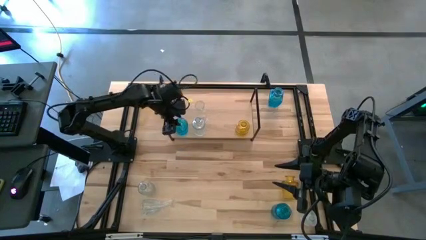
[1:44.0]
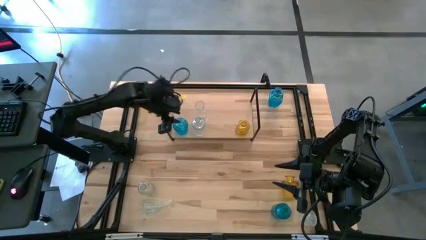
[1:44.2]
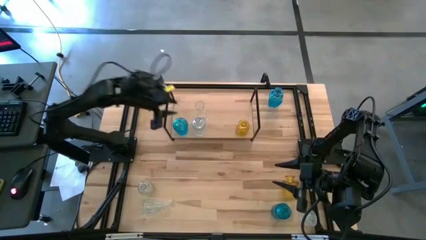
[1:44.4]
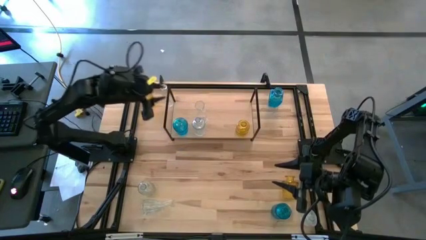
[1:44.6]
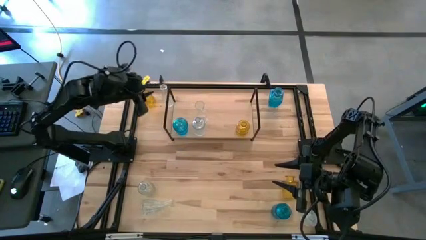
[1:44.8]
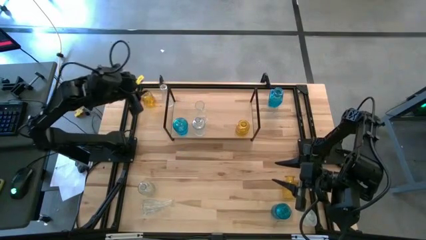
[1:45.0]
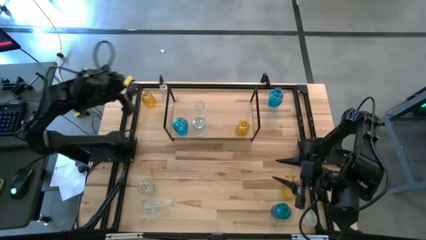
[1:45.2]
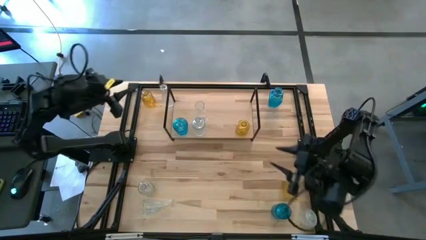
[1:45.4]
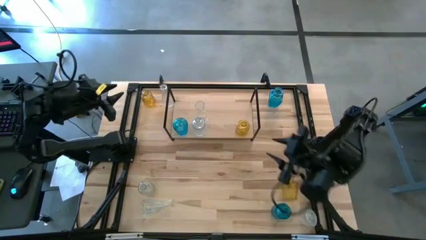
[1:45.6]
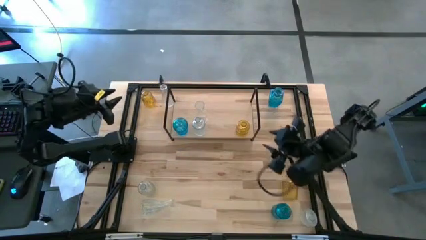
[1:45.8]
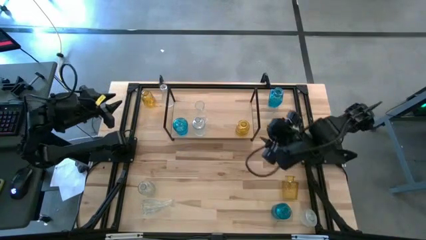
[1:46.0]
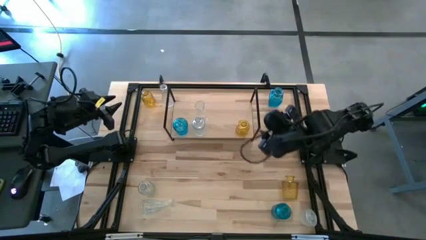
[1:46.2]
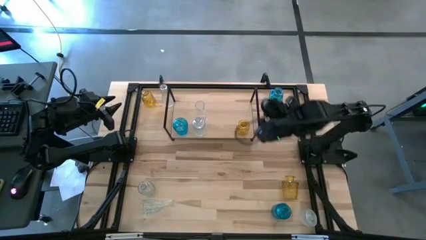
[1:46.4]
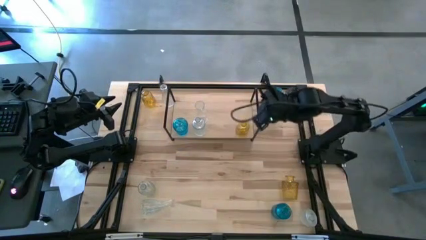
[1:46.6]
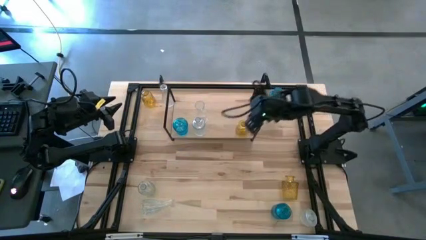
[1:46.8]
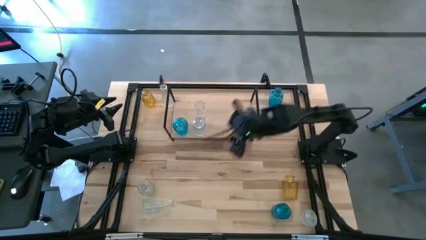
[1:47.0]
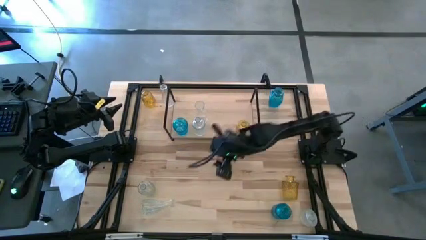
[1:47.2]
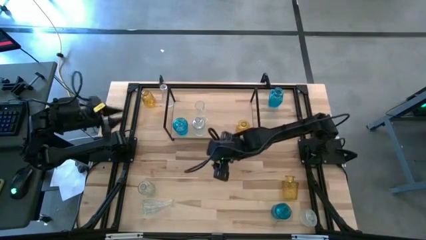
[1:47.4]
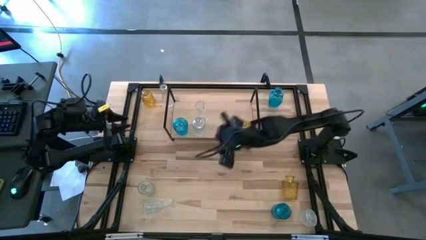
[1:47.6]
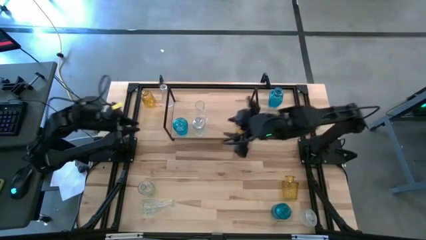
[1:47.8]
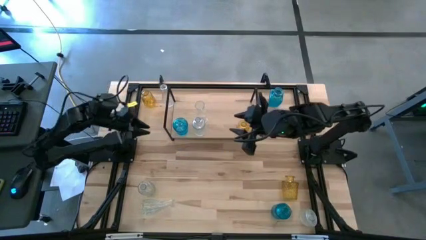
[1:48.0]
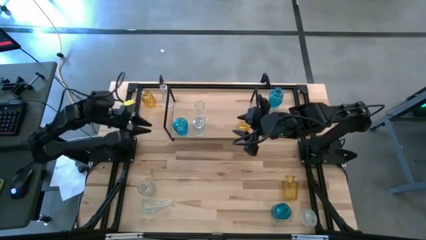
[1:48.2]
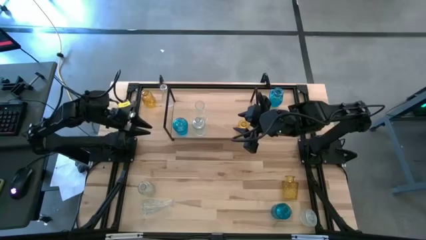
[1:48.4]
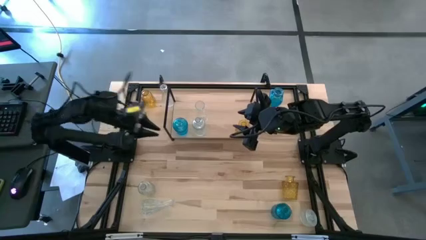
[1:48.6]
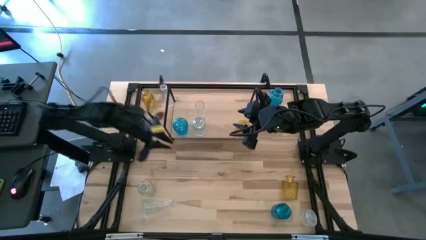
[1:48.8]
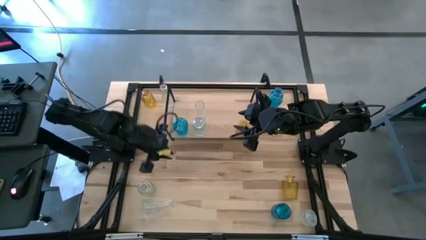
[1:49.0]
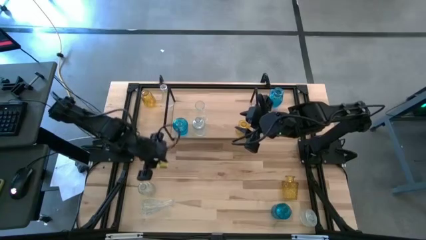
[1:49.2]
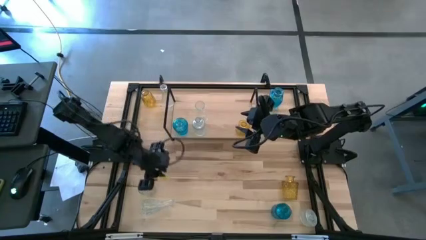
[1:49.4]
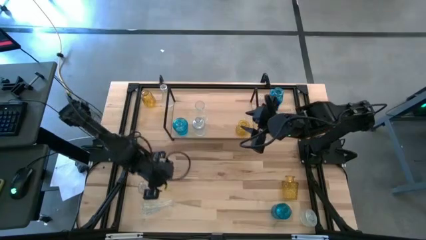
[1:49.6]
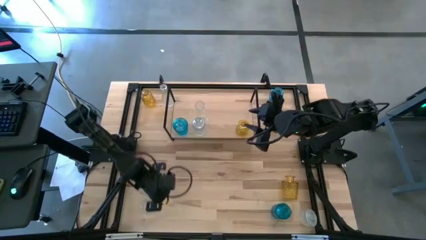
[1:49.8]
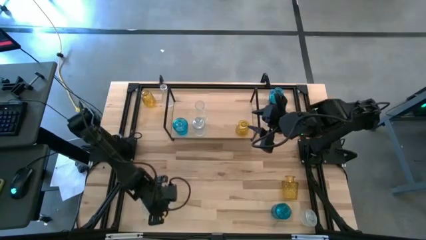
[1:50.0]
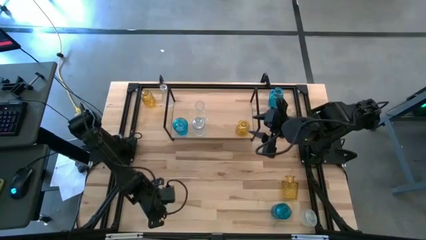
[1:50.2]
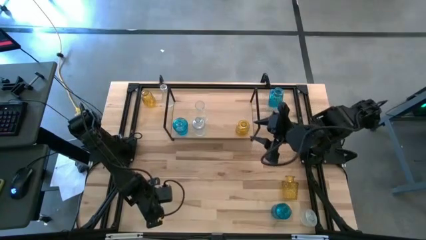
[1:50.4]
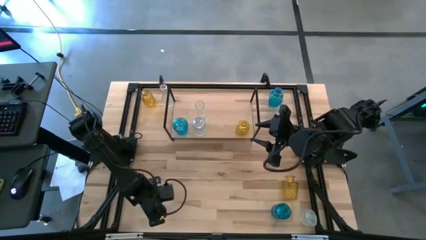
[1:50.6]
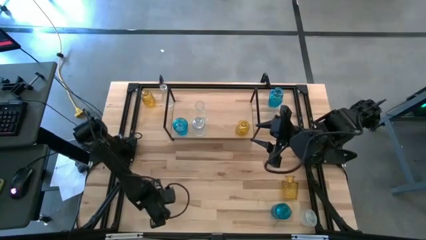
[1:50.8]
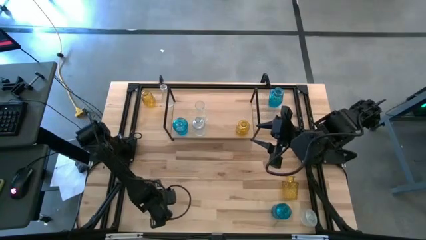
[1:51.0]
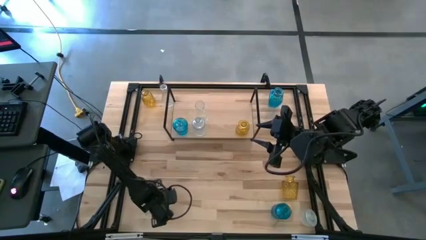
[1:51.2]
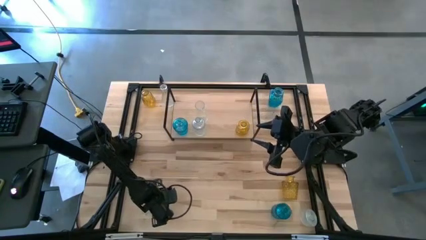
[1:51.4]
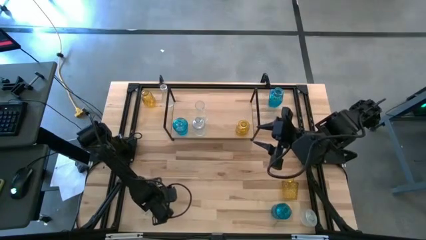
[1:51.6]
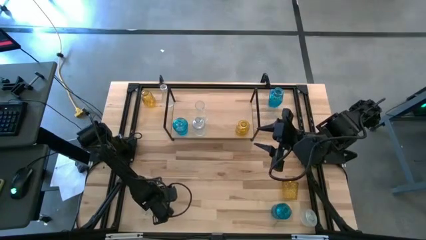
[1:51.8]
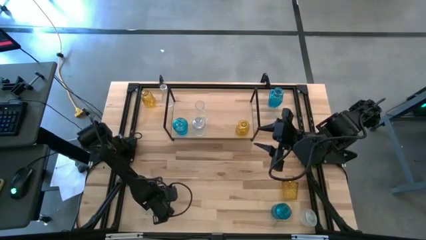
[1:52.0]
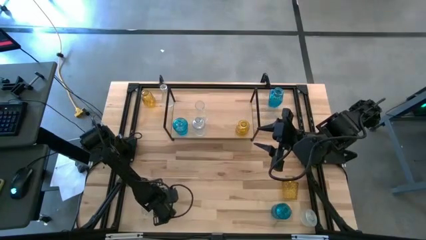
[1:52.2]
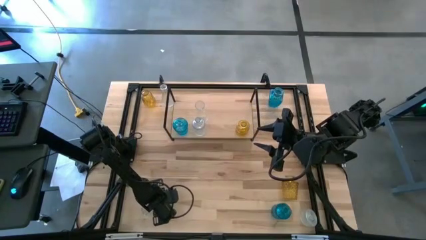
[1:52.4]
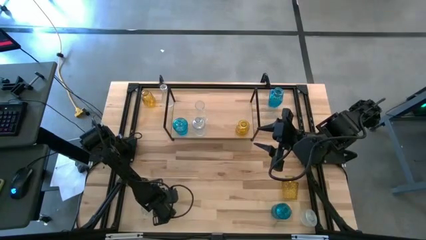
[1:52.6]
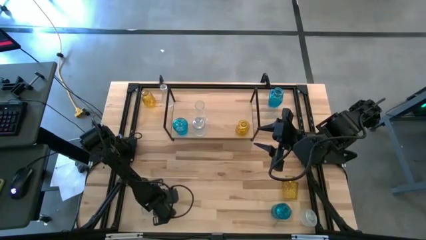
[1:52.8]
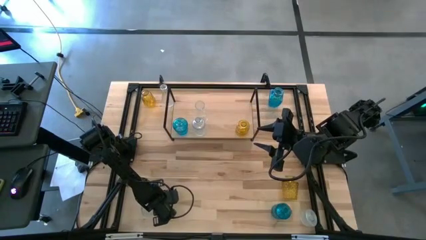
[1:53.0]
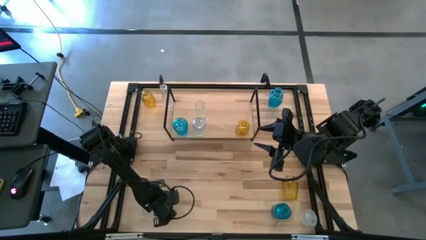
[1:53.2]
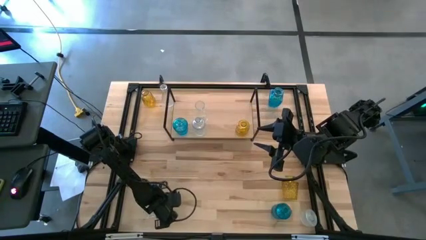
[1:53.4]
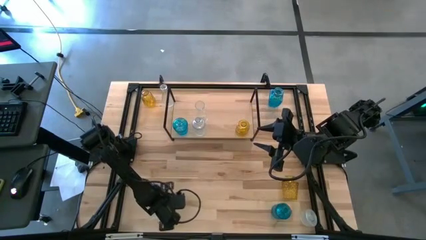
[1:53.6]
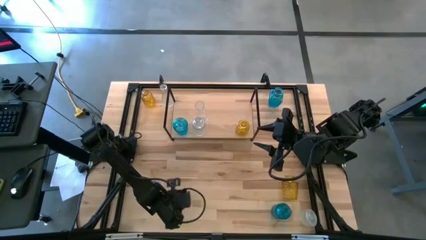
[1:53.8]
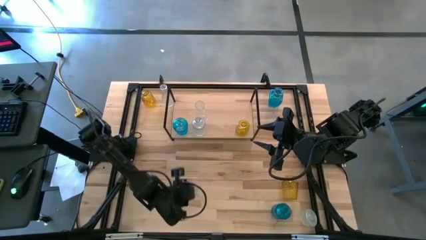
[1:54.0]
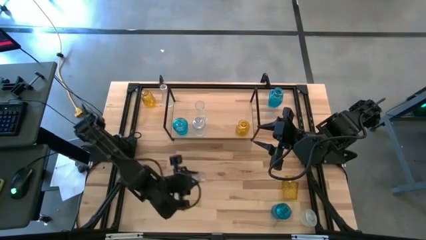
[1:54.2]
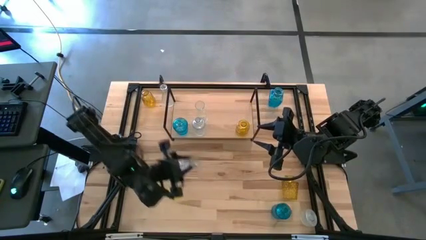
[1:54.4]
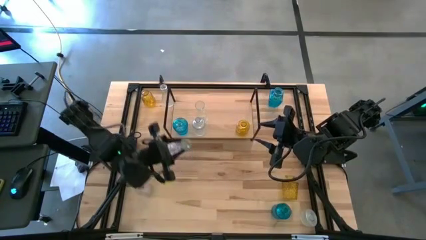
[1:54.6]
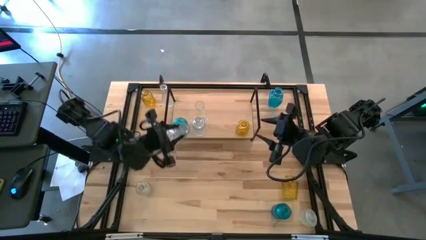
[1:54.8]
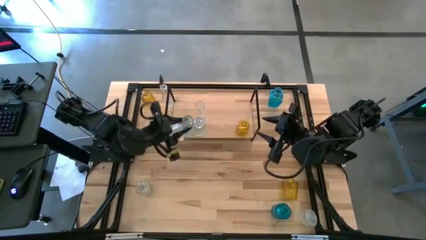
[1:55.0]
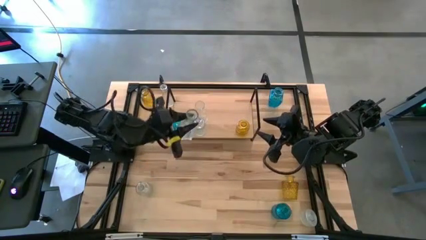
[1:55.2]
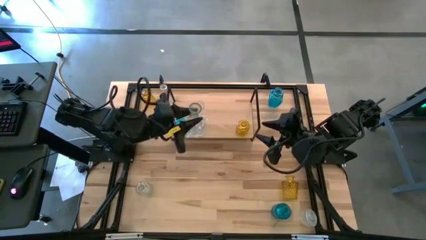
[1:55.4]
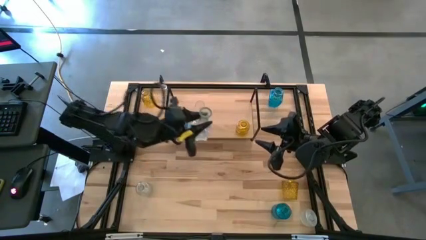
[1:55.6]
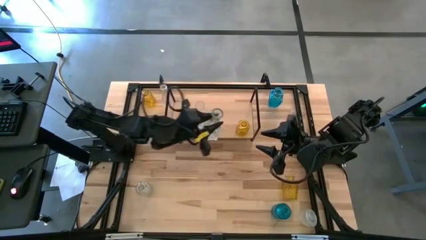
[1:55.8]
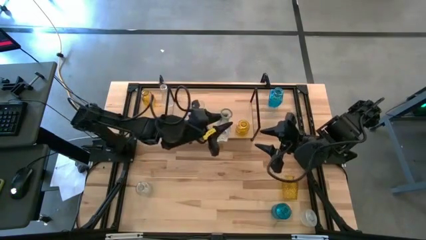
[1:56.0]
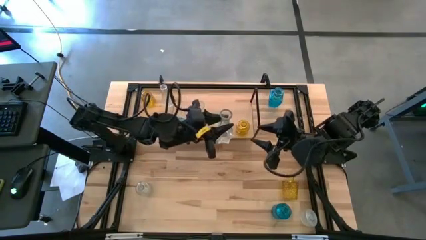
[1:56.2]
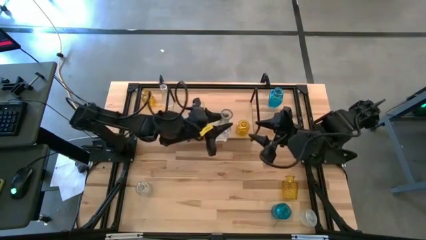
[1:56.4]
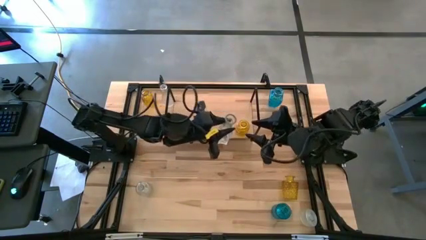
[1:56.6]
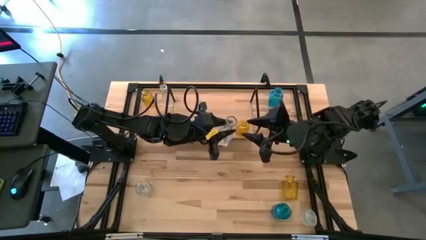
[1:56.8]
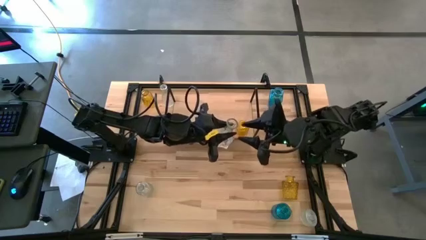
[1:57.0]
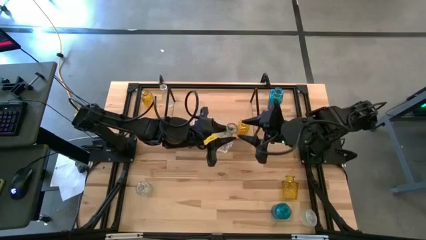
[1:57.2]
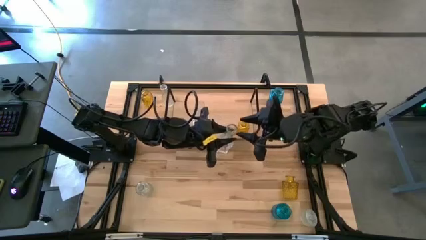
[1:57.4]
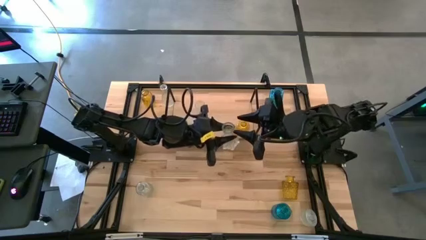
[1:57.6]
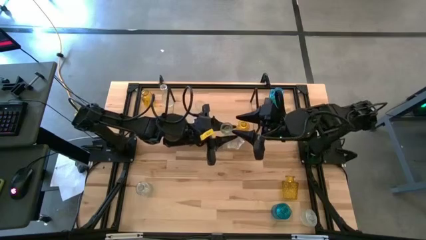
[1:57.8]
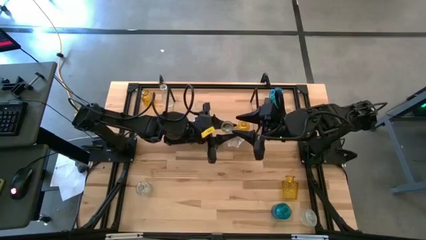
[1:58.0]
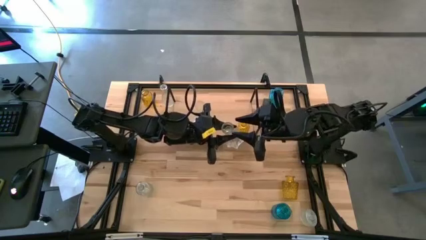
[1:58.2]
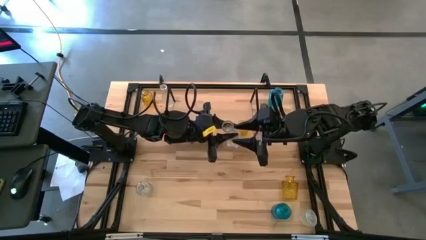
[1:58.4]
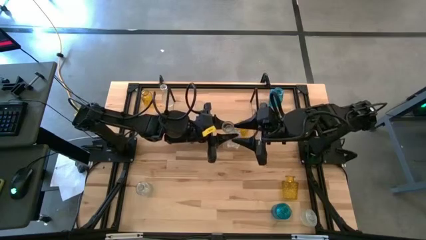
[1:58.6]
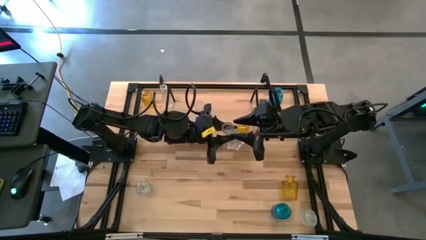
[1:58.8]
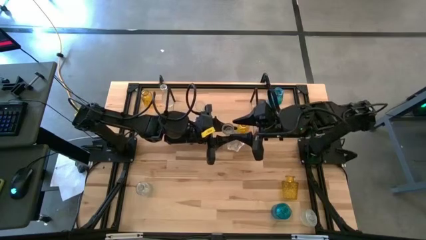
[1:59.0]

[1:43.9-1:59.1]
Task: sort vases onto shelf
Put the transparent vase on the shelf aligned with the other transparent vases
